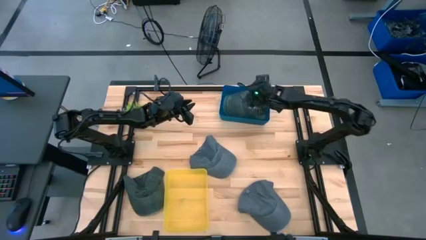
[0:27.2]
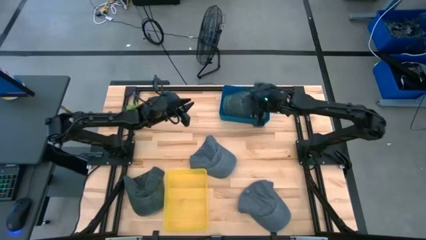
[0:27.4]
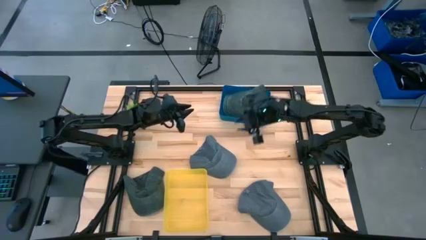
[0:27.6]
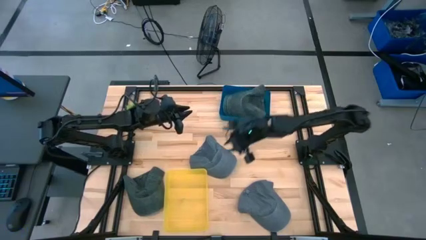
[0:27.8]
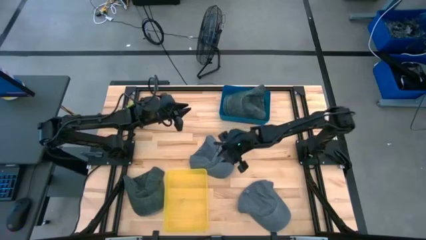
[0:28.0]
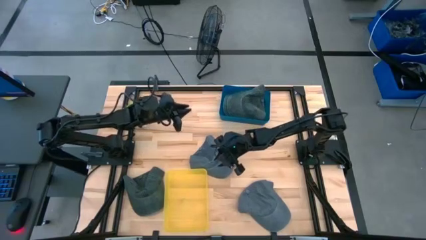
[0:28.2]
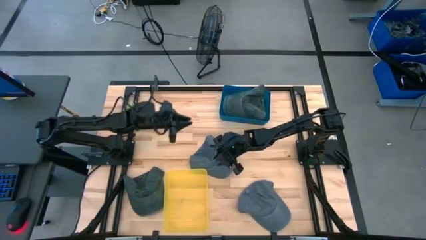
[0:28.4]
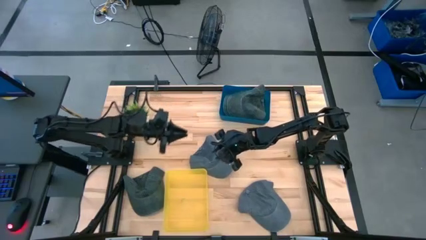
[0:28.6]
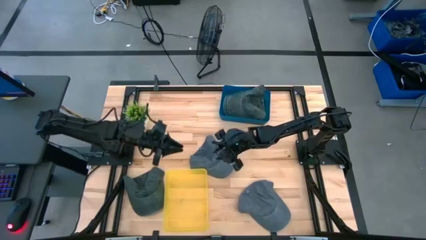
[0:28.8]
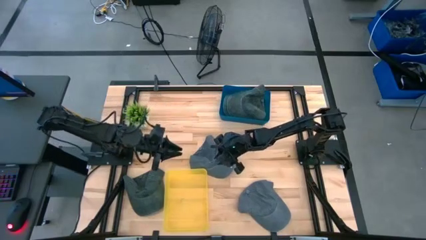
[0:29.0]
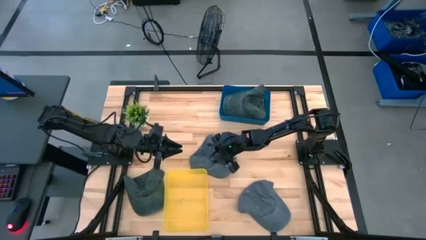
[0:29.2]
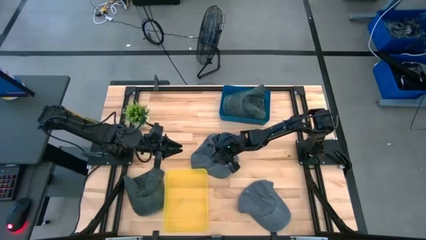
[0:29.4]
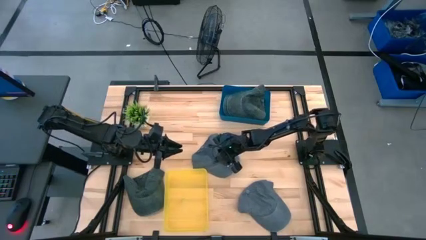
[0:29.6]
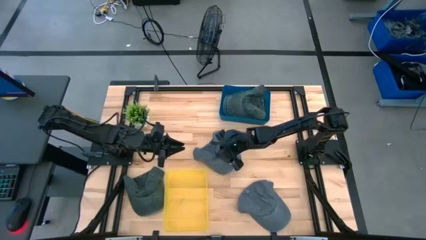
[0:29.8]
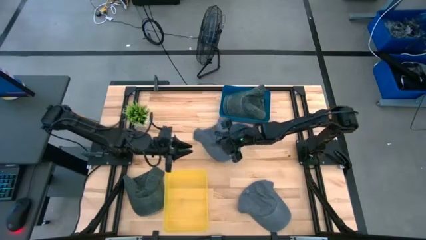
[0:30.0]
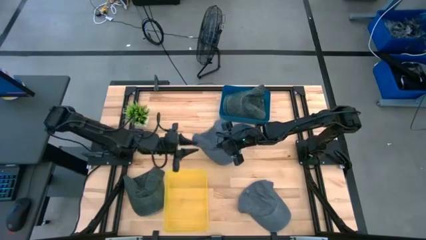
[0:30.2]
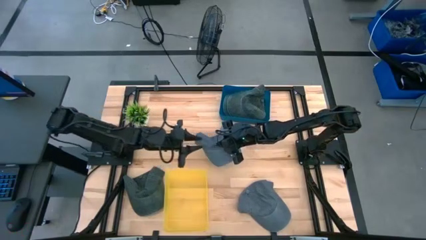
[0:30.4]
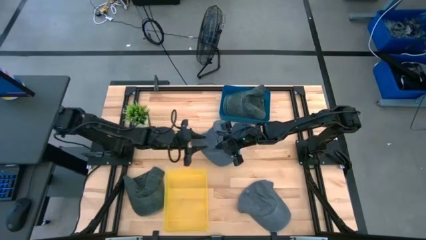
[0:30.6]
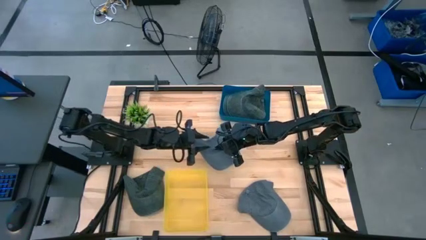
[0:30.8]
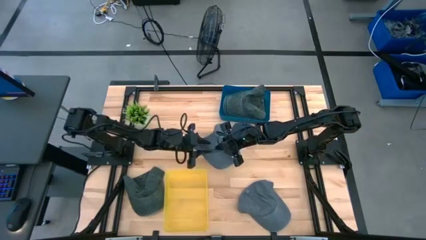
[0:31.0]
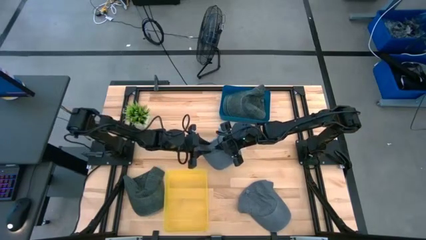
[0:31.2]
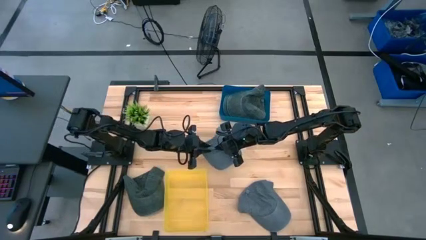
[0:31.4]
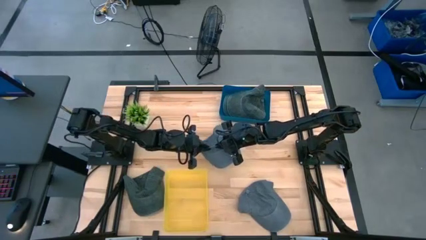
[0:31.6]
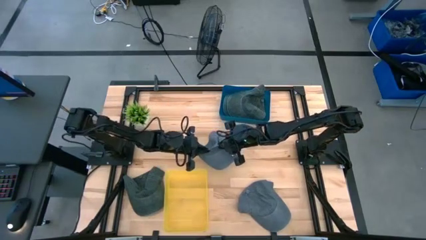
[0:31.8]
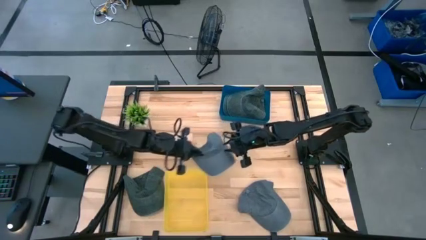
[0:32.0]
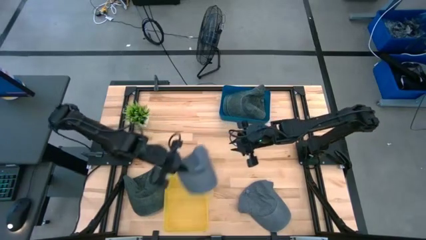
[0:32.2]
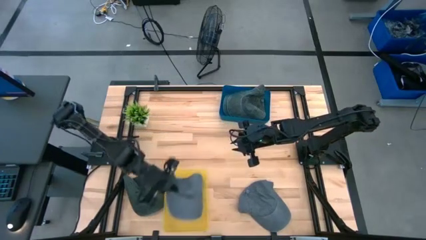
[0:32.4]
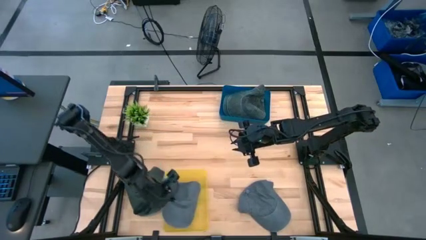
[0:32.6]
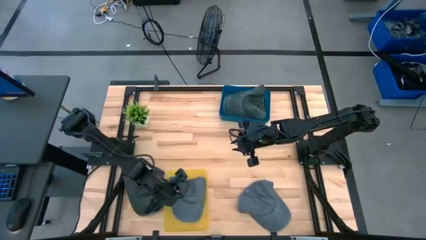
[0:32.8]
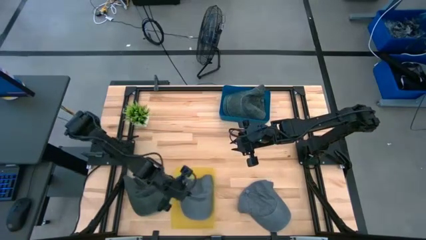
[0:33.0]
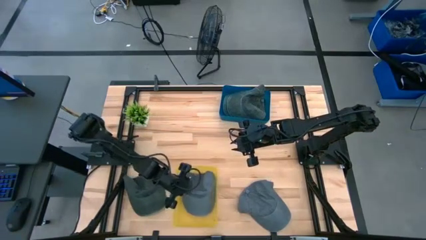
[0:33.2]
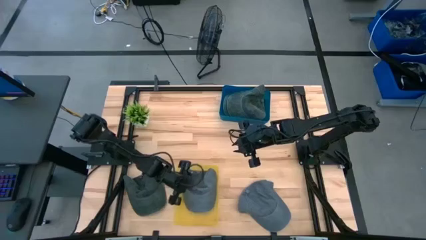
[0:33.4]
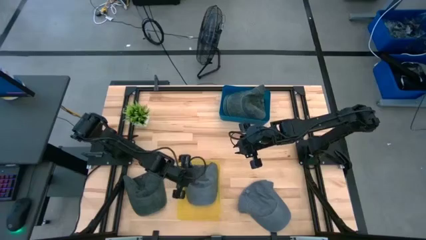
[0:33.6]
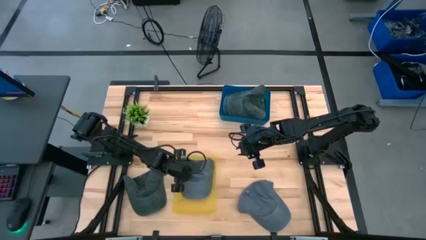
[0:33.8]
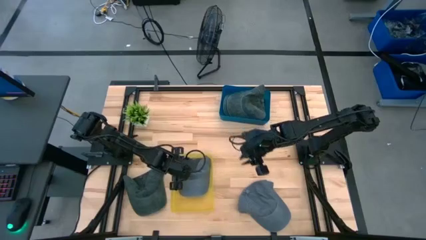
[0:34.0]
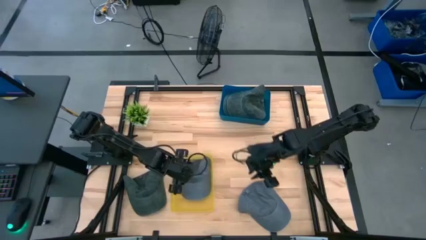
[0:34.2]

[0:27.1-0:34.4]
Task: Pick & Place hat
Put the top gray cap into the yellow bin

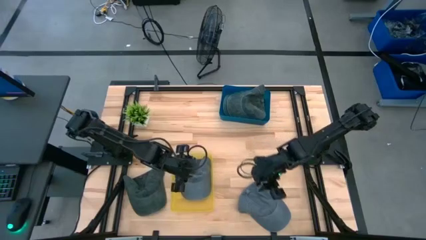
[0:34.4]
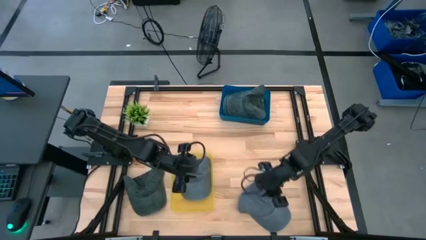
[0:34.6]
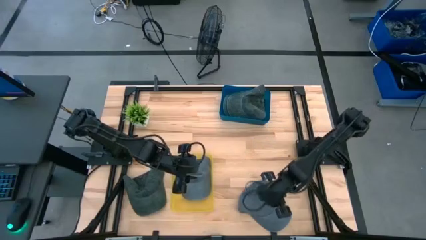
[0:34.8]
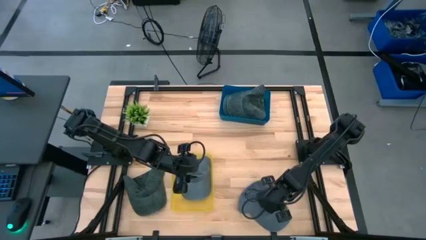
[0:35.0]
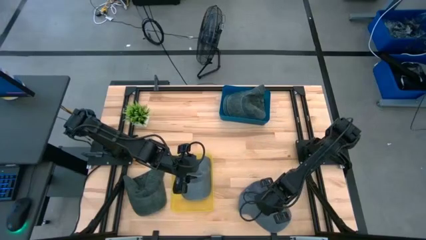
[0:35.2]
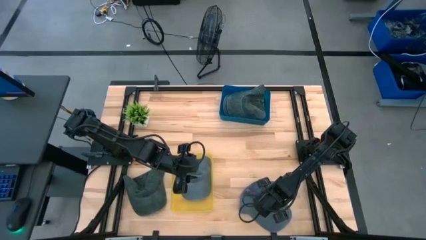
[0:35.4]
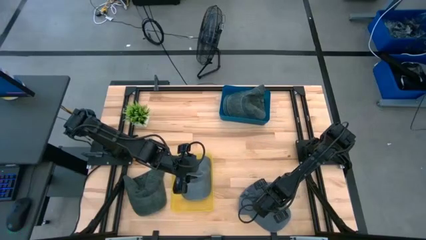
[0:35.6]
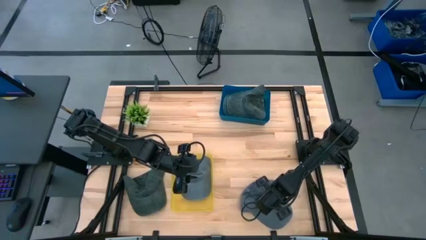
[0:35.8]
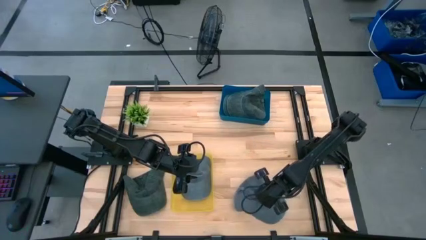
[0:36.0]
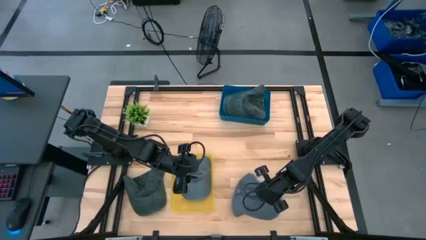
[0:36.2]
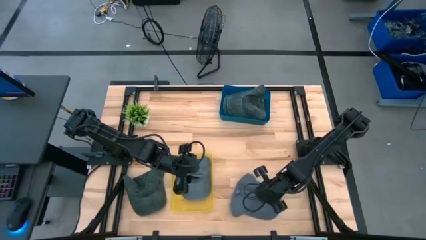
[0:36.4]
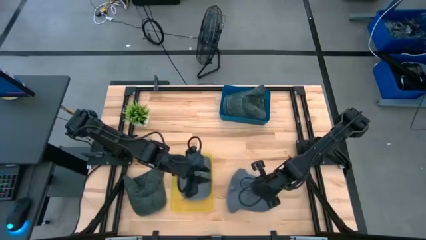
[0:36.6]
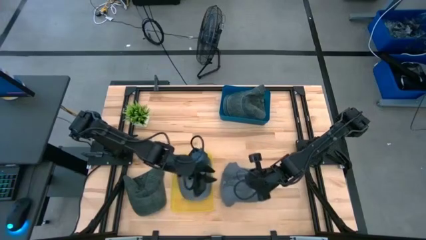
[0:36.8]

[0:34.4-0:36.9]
Put the gray cap into the yellow bin

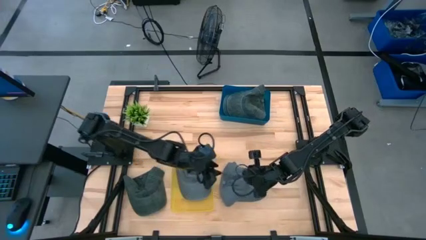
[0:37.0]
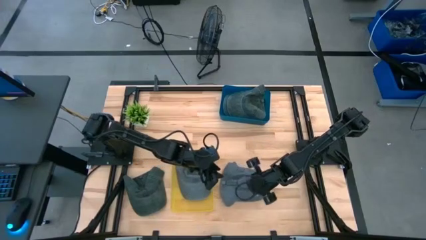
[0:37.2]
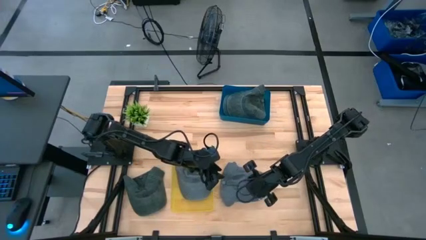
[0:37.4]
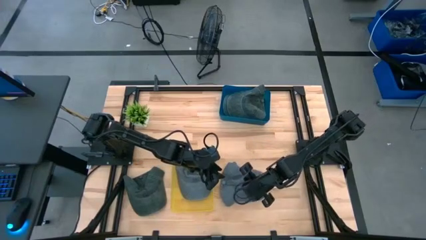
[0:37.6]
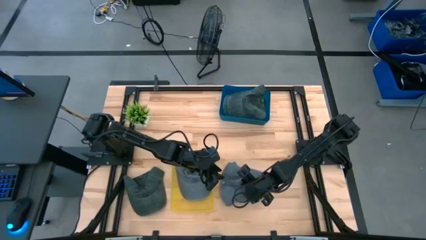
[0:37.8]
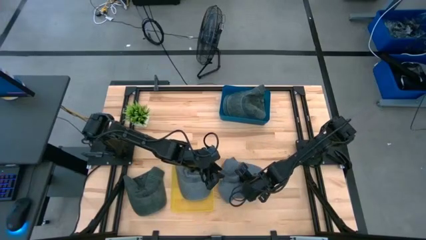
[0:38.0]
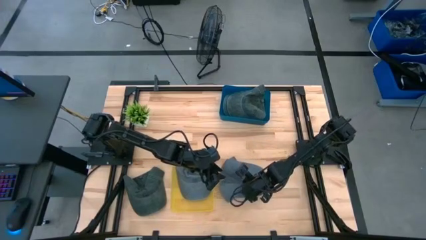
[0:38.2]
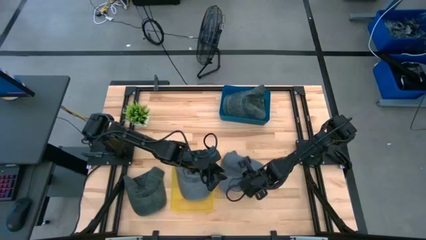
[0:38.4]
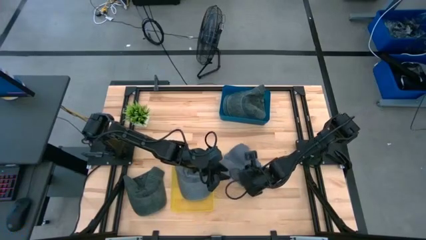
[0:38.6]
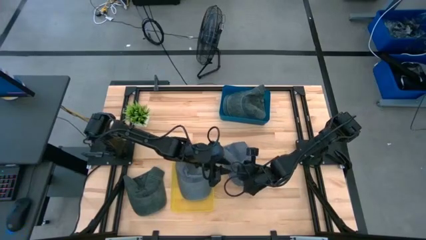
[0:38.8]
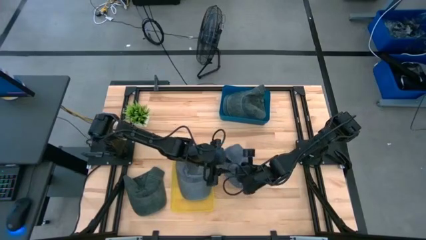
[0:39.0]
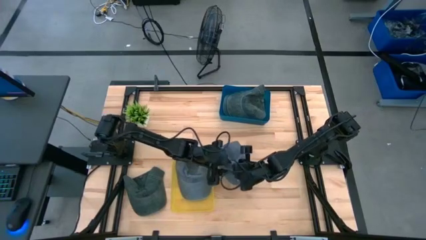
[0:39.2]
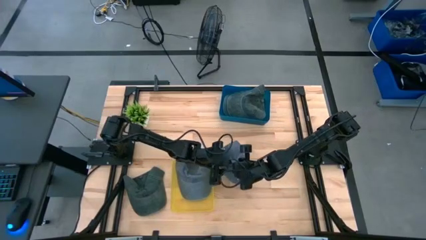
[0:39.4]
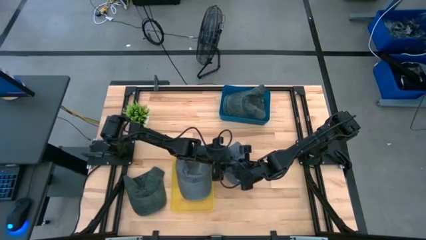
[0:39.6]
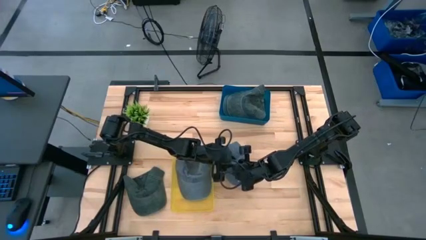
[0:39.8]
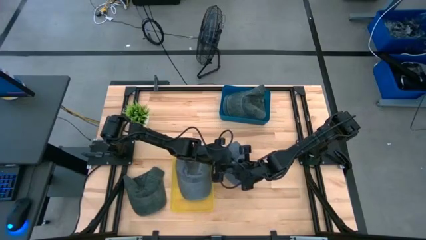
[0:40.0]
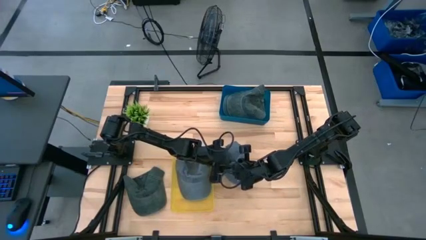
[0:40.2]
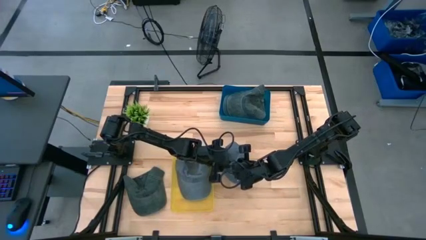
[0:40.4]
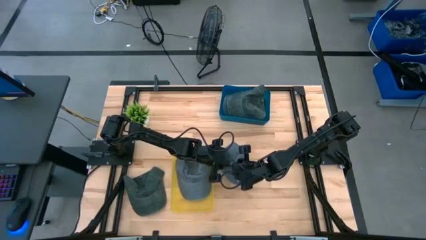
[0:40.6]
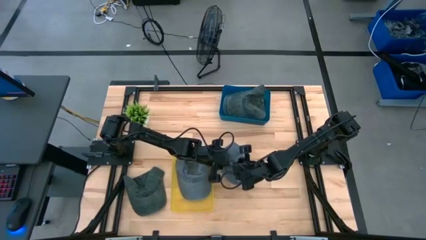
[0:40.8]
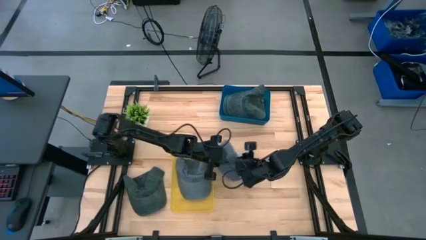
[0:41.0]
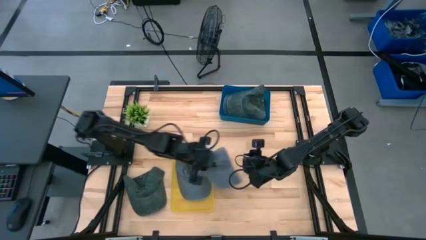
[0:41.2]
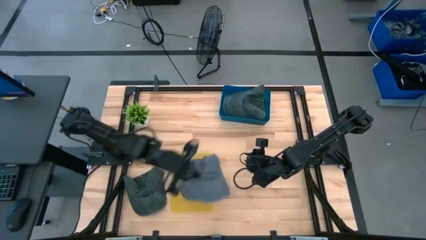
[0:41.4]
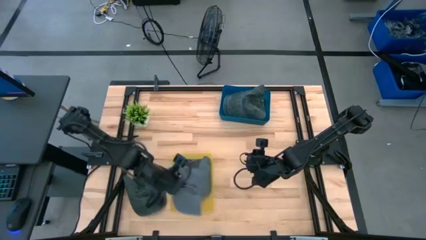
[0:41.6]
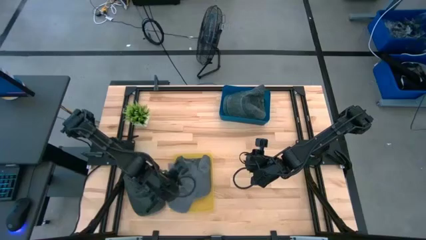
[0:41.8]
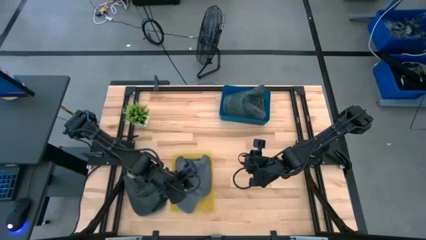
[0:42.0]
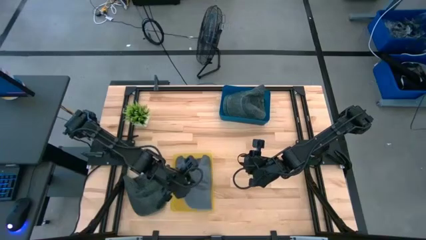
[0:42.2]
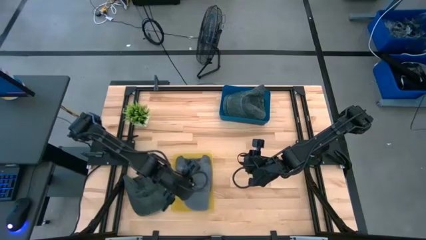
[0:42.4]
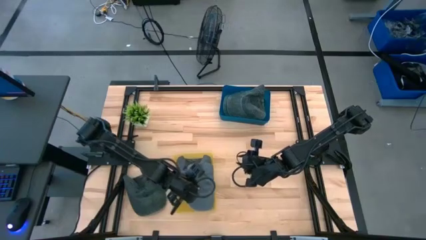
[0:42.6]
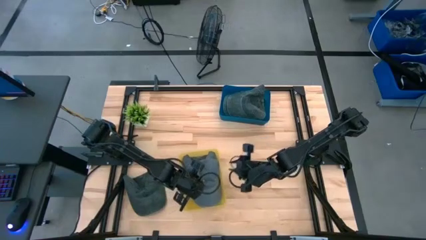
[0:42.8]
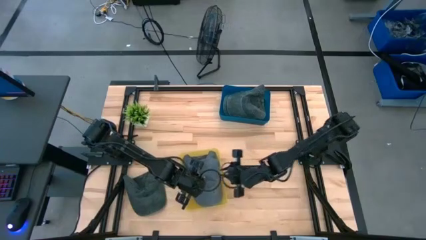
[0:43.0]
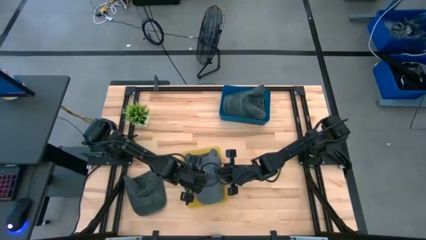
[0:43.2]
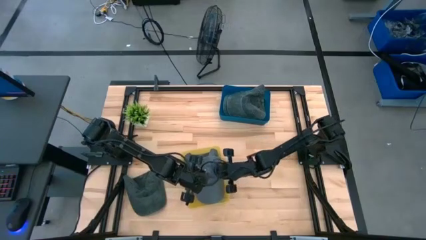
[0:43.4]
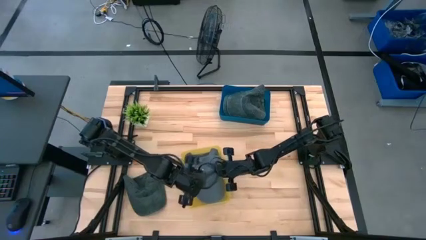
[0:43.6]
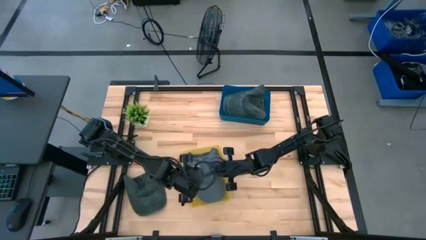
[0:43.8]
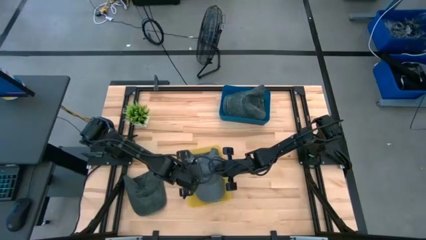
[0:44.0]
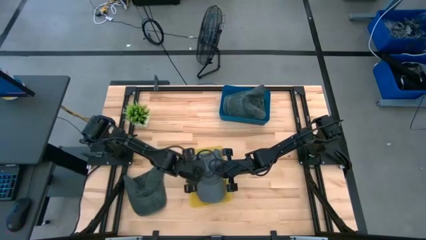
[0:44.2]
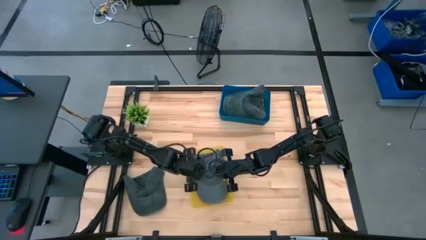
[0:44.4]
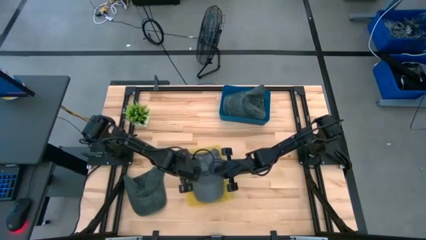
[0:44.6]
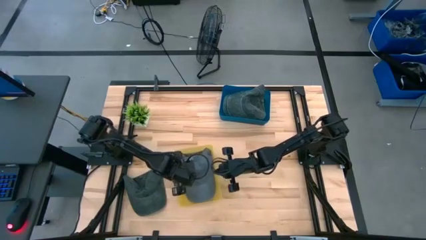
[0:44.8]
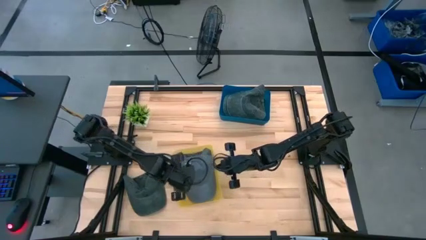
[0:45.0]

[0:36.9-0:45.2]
Put the gray cap into the yellow bin
